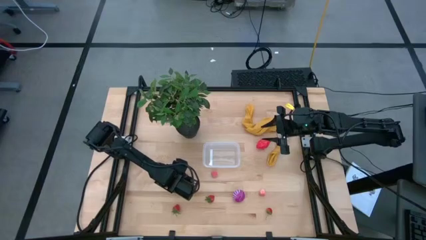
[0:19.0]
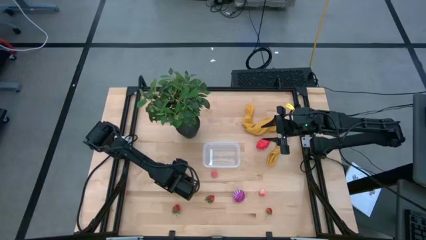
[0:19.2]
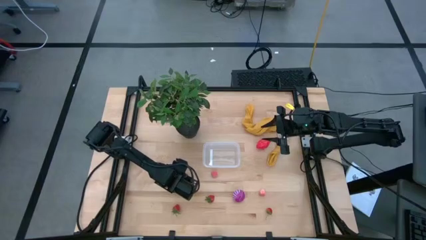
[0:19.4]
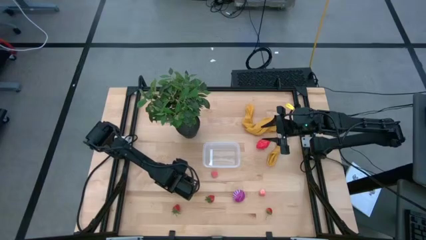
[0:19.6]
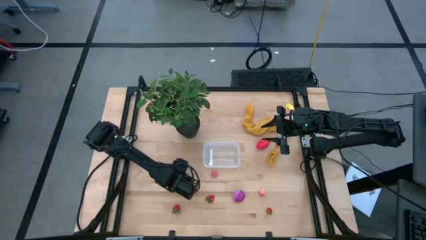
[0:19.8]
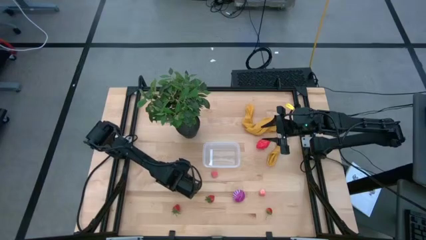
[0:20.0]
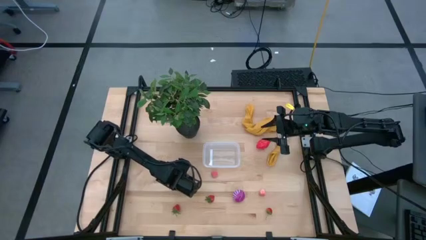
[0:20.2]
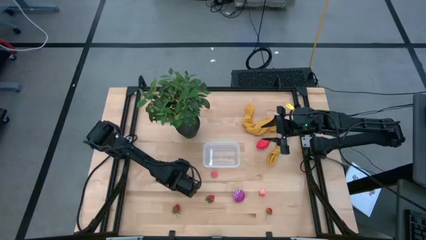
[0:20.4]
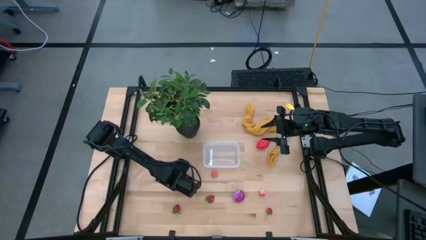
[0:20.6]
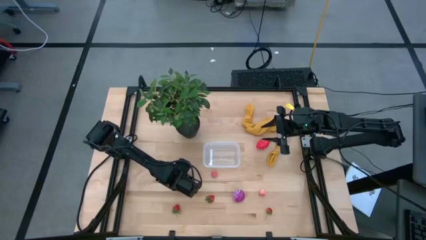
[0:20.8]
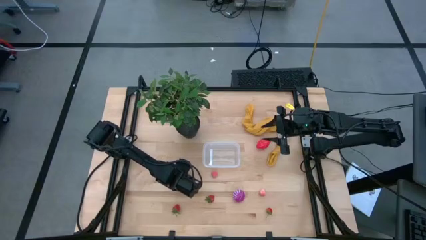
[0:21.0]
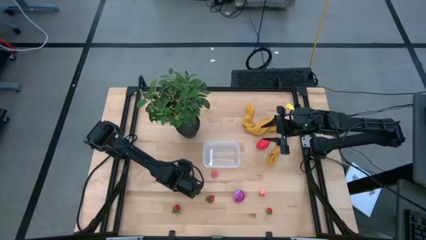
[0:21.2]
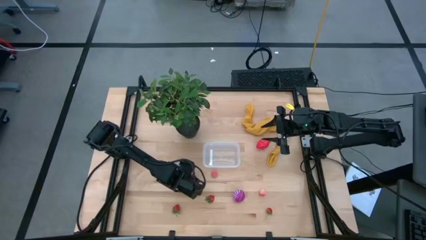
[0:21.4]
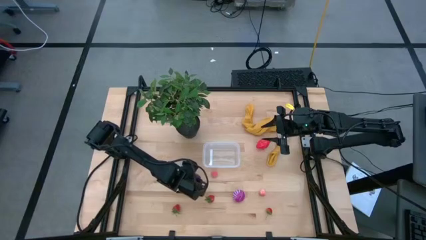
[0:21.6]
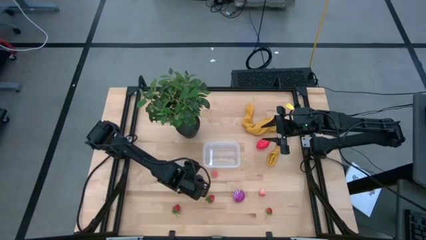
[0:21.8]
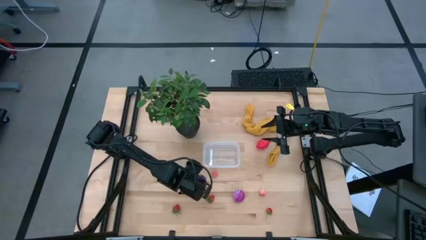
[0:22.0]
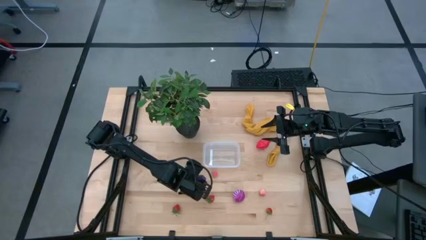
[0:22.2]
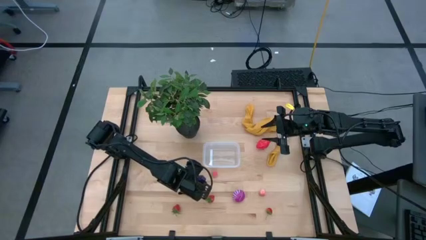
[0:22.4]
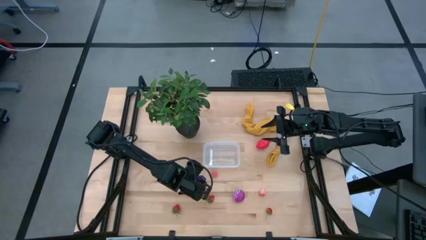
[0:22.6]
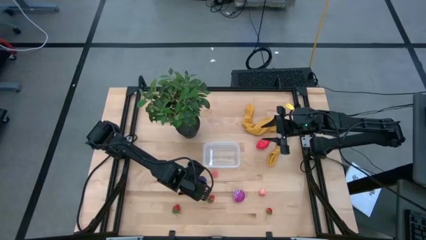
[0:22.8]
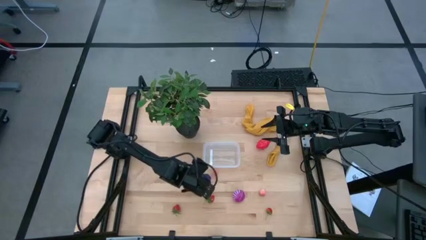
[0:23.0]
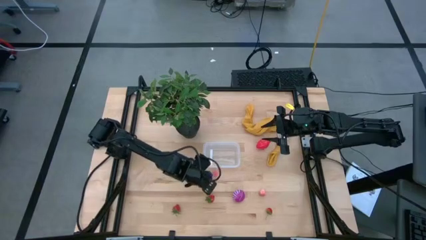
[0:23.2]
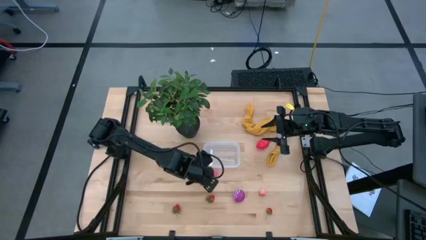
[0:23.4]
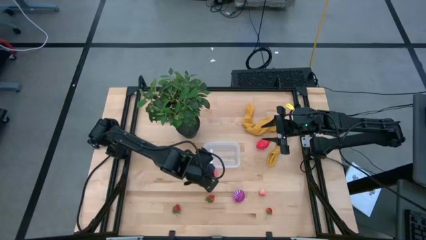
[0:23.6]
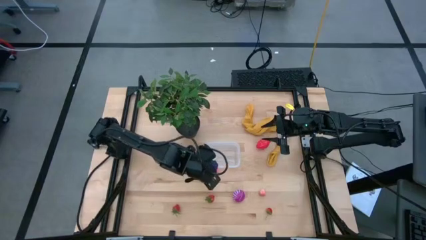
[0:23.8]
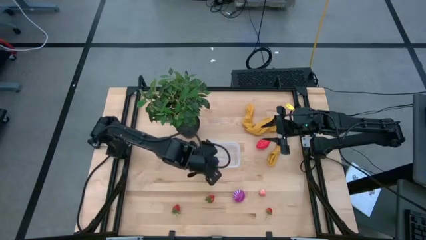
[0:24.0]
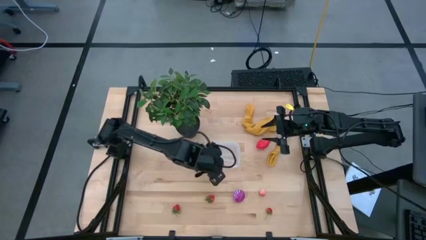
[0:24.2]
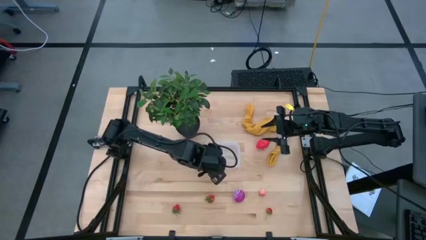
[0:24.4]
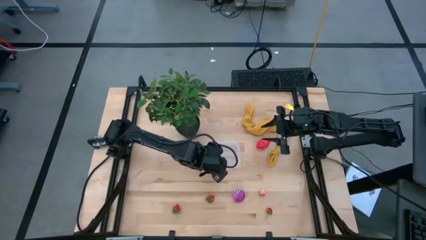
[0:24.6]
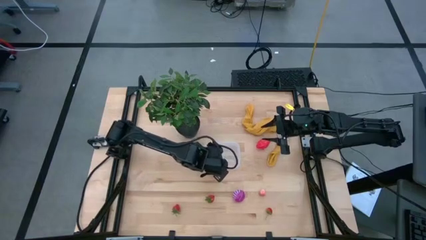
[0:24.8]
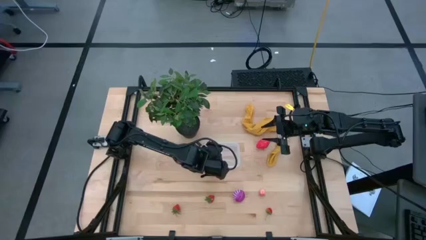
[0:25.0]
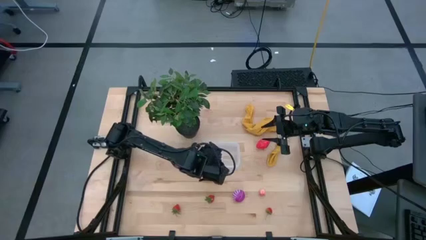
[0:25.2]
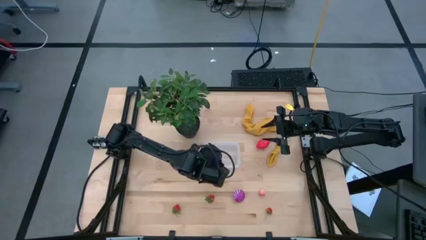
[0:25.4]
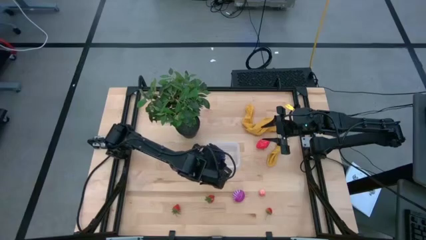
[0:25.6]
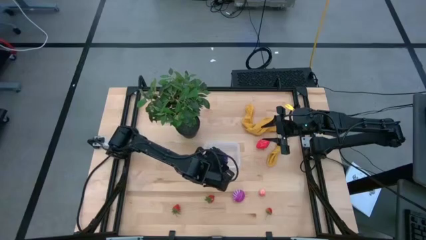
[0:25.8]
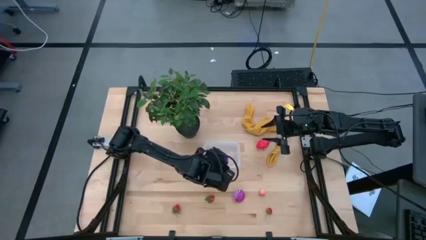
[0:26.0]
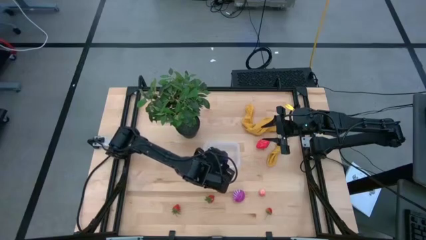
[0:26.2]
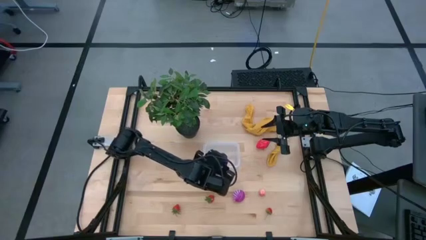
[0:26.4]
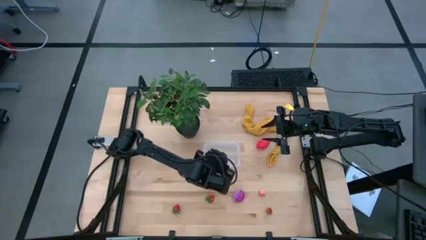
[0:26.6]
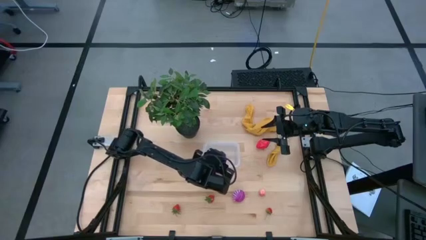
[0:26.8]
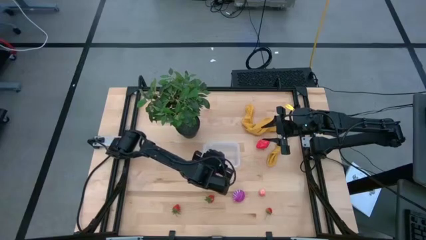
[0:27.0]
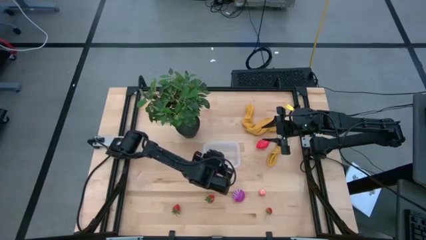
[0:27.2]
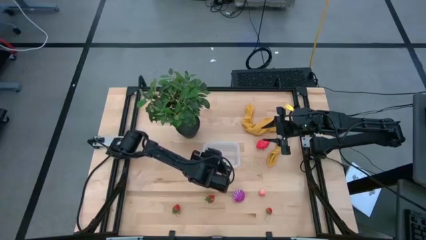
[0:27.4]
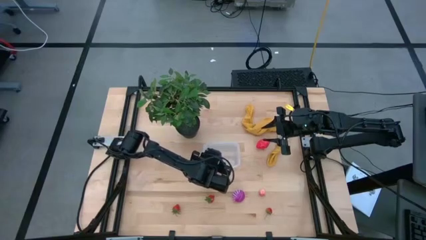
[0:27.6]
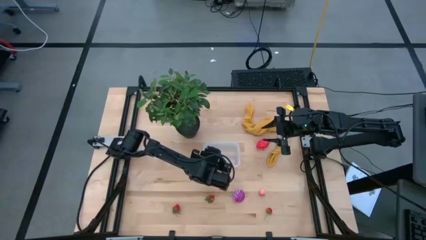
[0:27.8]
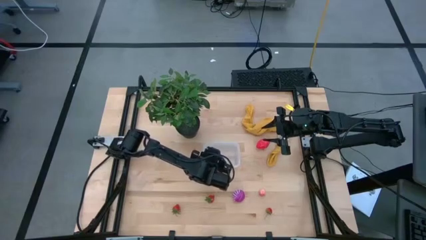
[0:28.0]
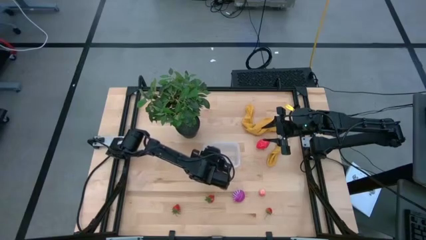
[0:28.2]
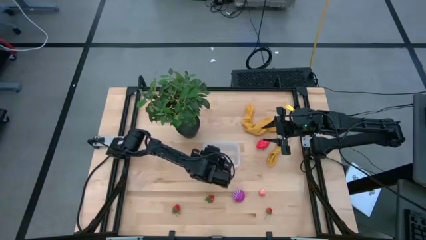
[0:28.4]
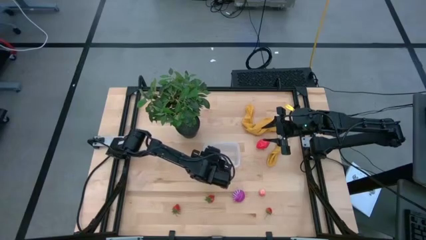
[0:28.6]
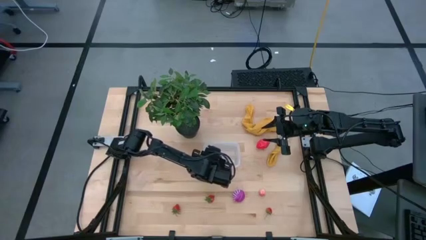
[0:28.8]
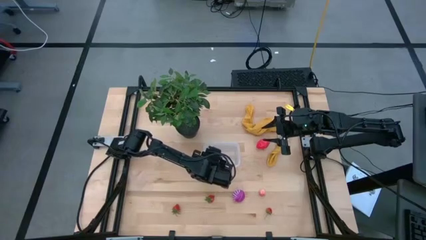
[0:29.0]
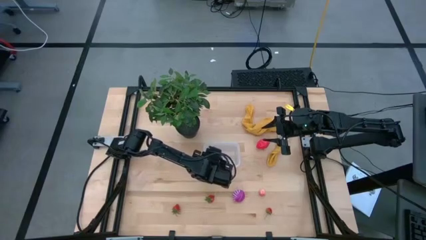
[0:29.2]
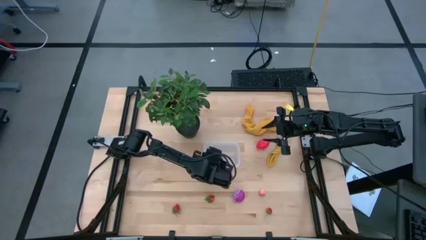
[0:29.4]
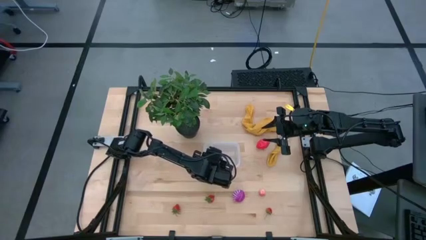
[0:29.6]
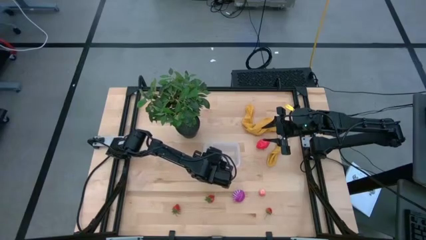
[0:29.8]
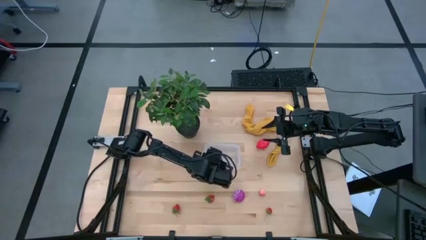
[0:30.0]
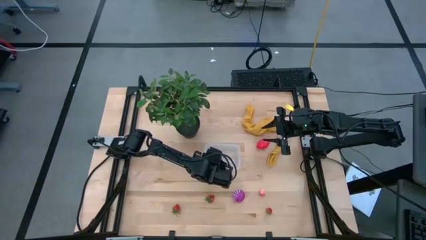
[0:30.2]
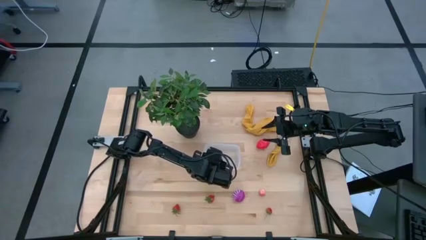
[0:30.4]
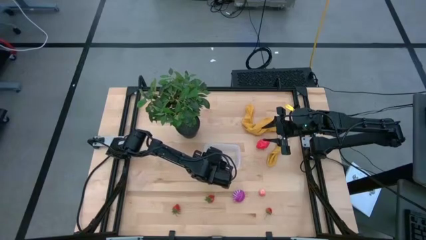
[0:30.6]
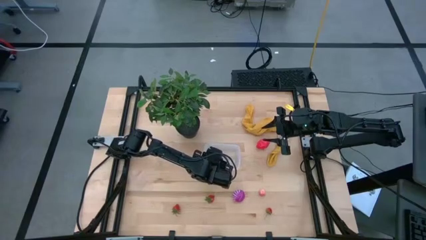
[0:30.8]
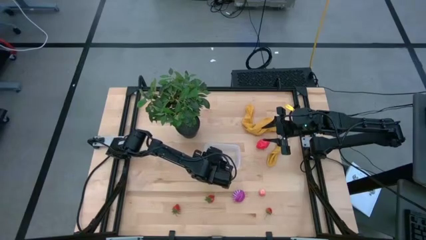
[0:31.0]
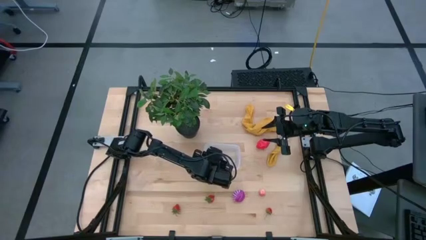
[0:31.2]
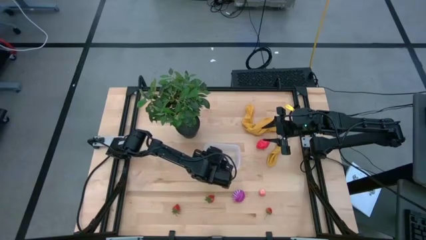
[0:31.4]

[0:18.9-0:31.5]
Task: Pick and placing Produce into tupperware
Put the grapes into the bin

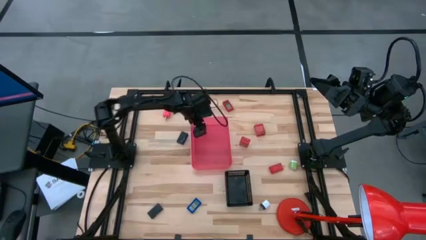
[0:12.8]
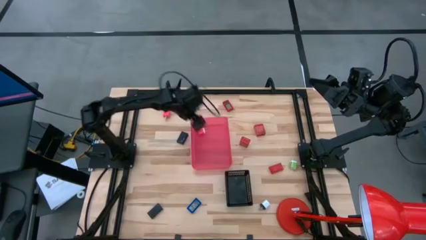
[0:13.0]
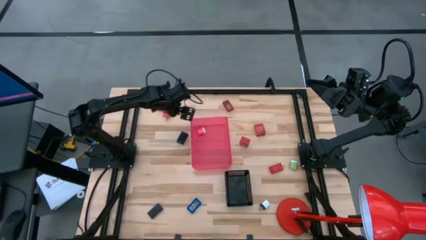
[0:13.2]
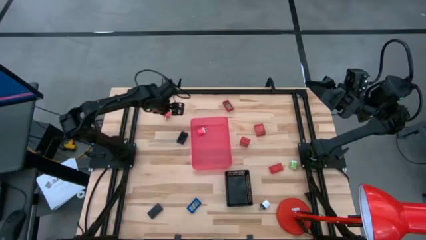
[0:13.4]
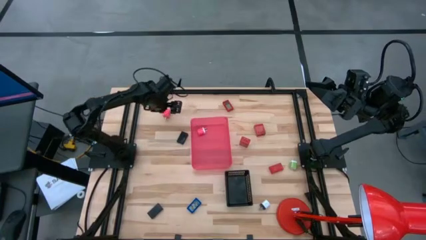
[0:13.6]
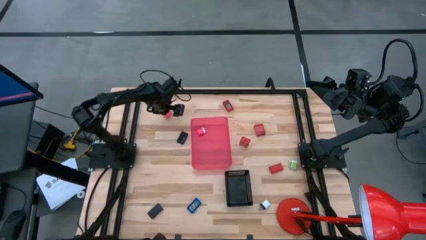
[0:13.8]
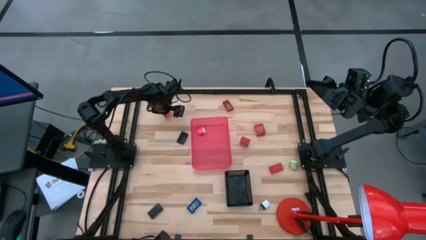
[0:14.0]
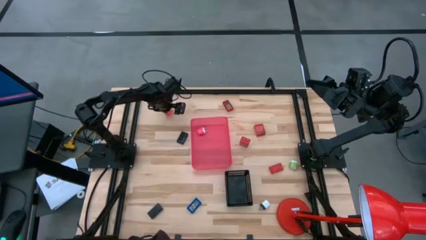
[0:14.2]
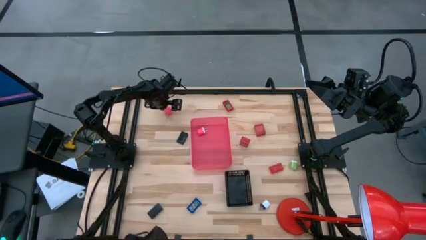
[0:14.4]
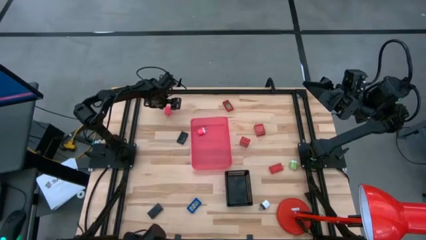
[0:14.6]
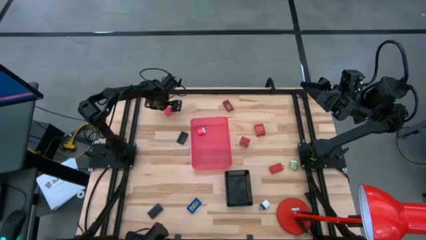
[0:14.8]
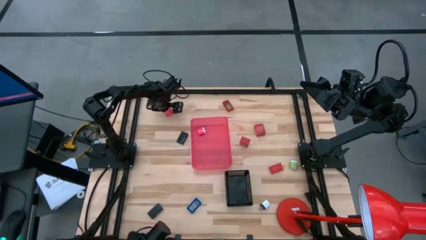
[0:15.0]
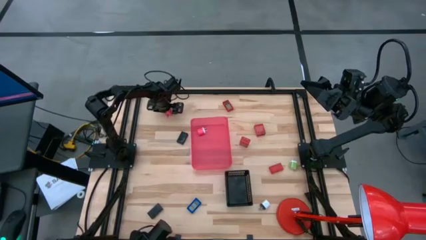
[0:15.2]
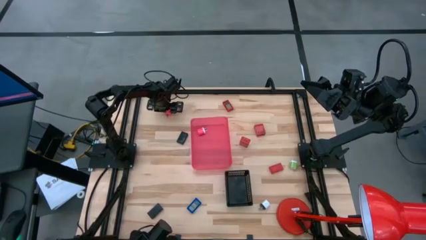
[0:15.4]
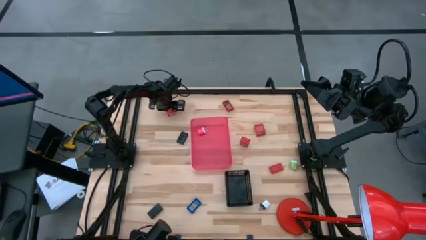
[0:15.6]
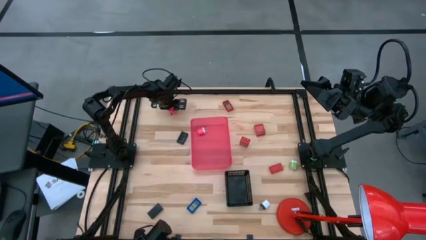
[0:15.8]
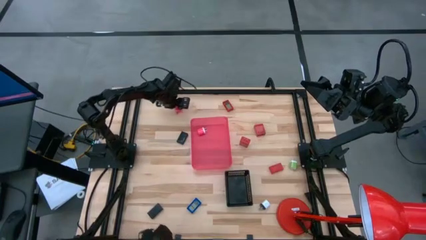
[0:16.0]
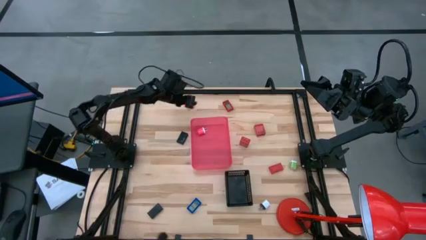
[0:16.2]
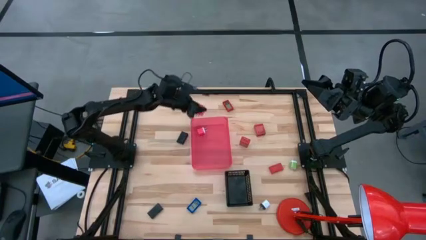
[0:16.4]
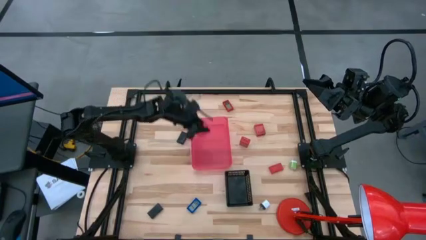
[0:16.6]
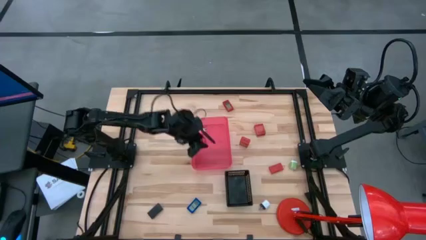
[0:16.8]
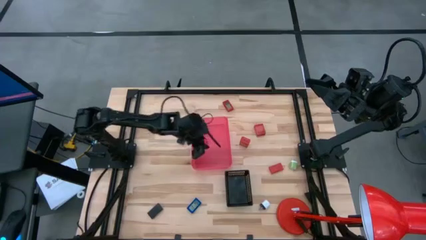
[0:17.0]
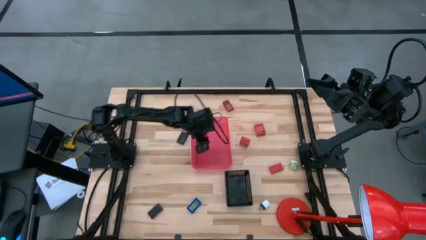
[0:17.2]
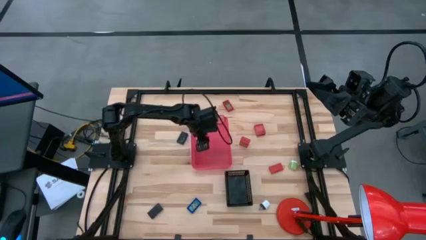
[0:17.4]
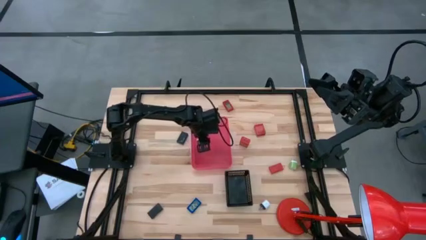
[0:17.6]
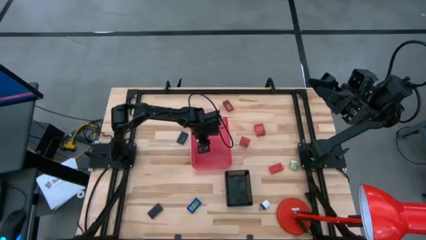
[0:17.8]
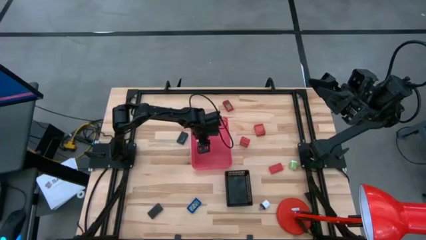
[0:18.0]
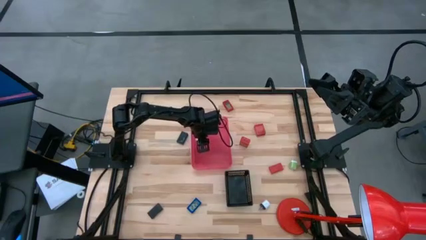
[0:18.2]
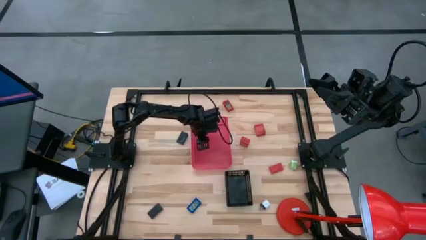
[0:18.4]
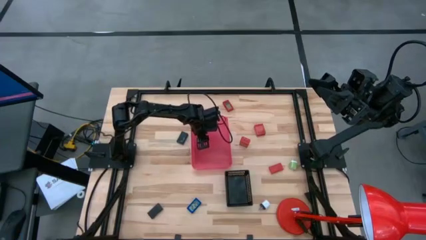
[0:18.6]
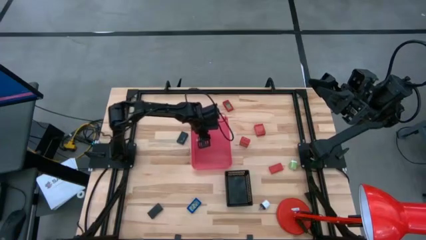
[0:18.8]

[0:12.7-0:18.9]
Task: Pick & Place Office items
Put the pink charger adapter into the pink bin
